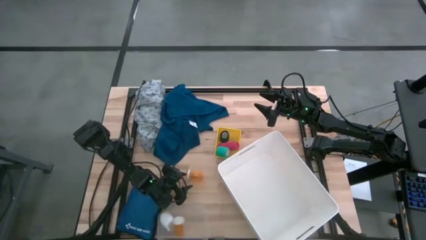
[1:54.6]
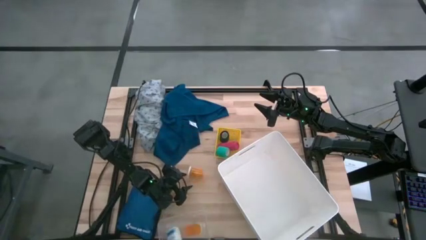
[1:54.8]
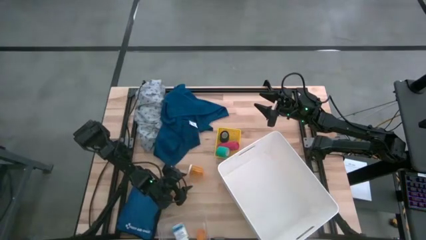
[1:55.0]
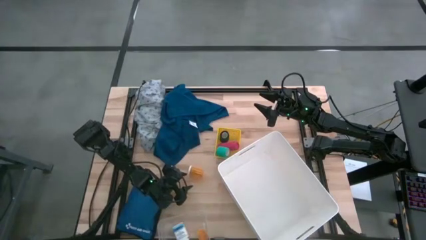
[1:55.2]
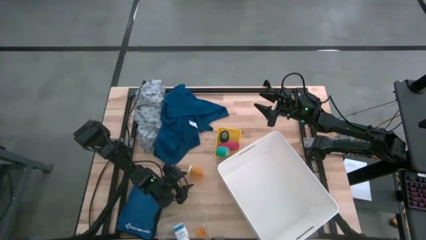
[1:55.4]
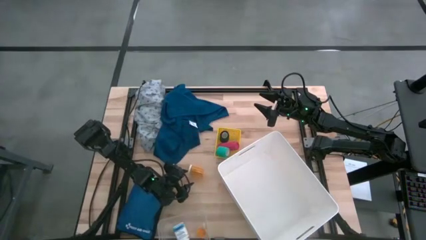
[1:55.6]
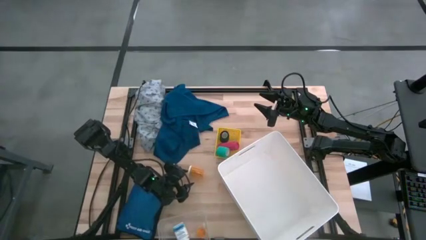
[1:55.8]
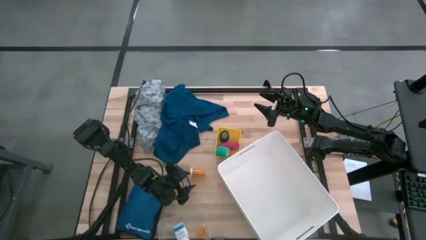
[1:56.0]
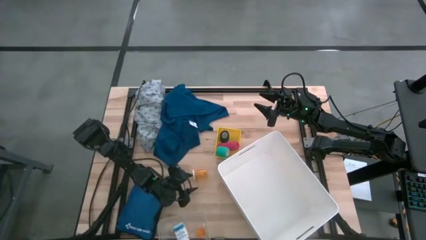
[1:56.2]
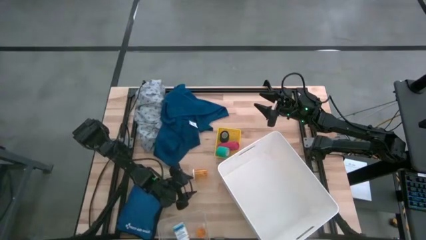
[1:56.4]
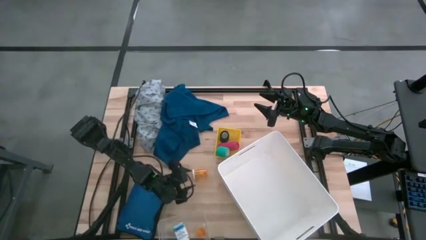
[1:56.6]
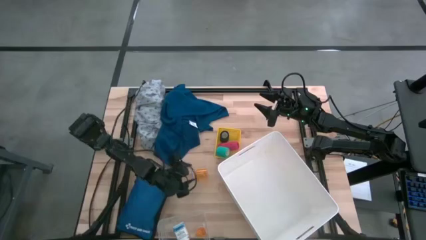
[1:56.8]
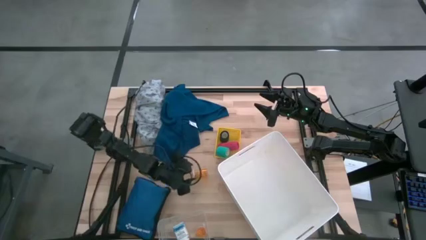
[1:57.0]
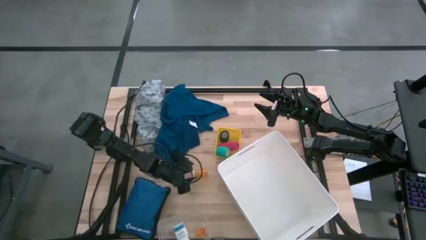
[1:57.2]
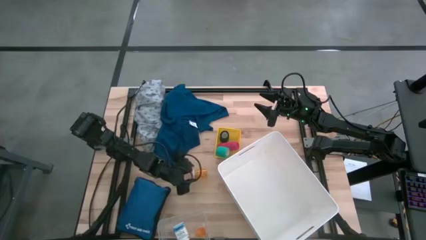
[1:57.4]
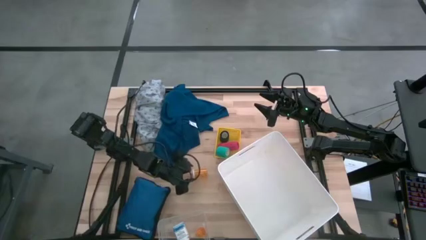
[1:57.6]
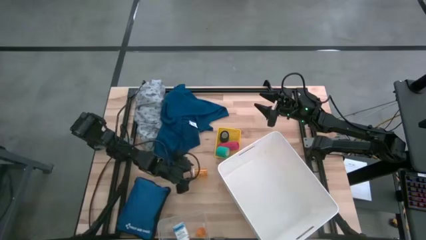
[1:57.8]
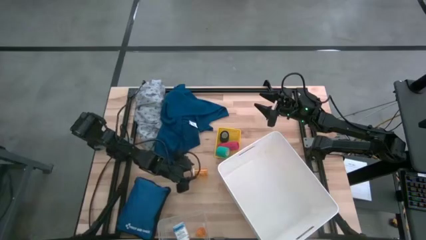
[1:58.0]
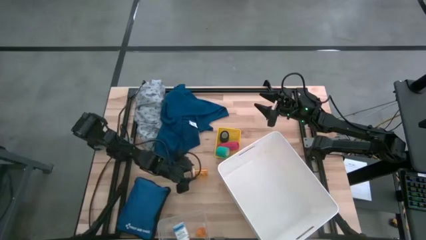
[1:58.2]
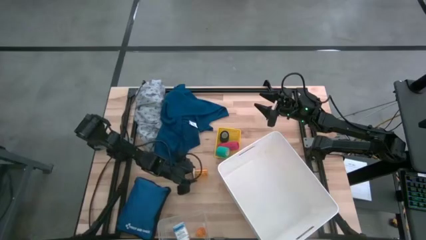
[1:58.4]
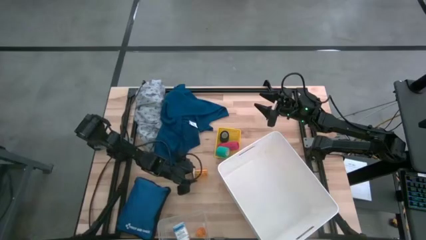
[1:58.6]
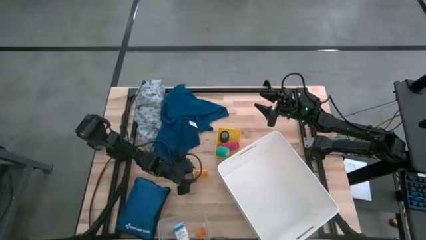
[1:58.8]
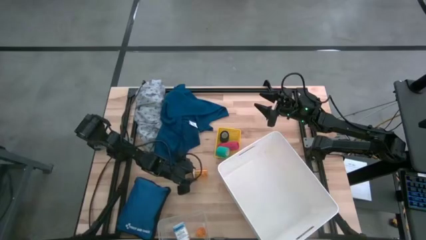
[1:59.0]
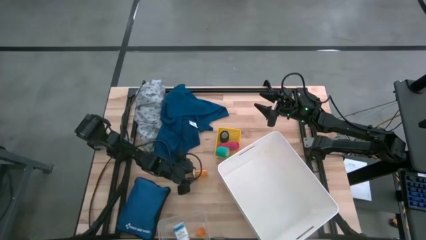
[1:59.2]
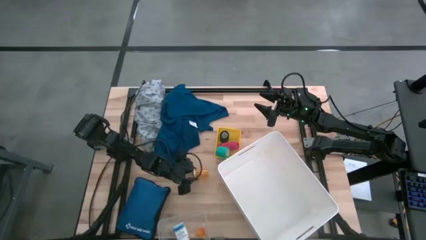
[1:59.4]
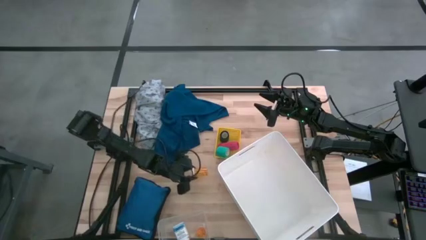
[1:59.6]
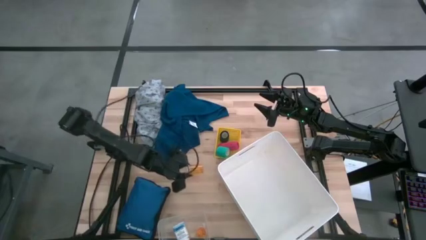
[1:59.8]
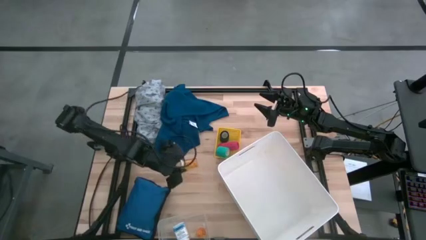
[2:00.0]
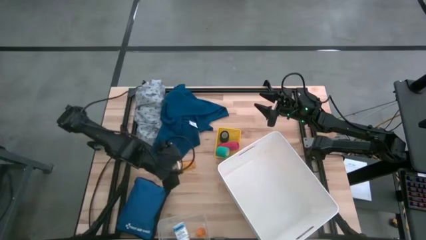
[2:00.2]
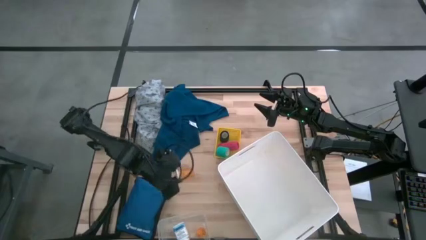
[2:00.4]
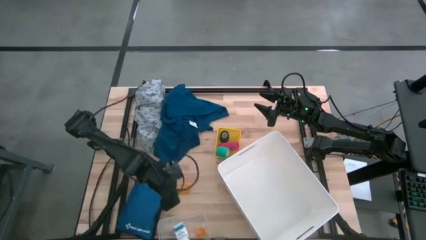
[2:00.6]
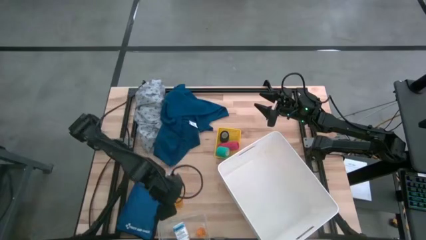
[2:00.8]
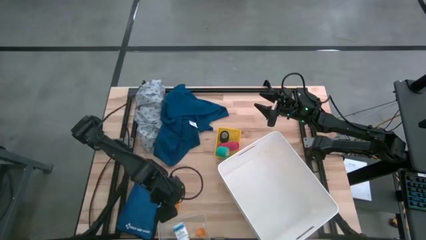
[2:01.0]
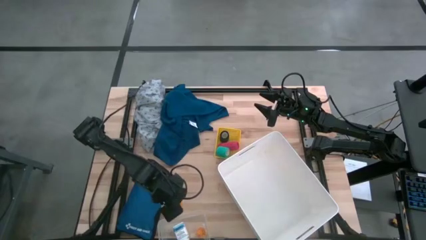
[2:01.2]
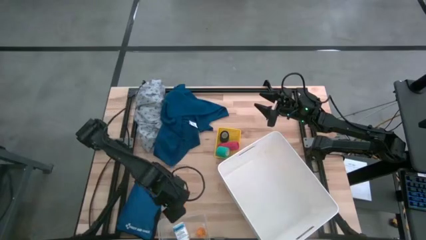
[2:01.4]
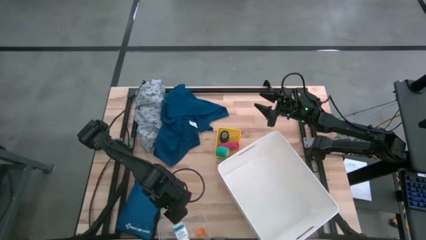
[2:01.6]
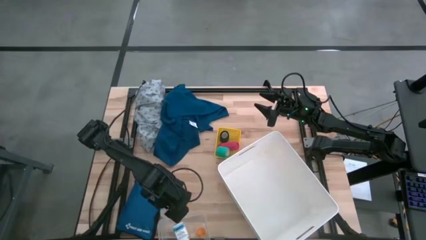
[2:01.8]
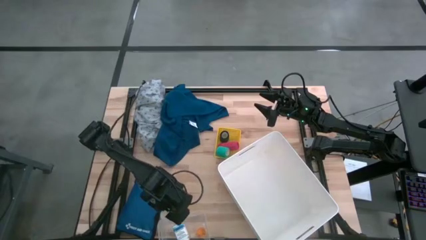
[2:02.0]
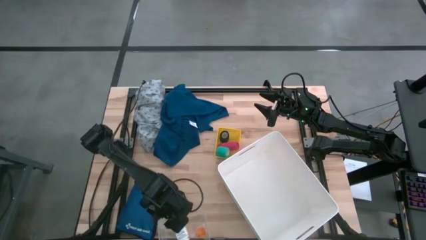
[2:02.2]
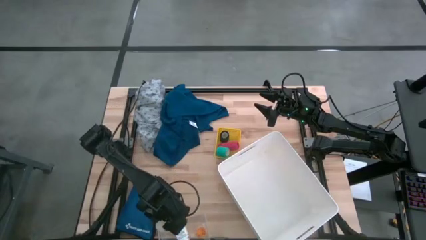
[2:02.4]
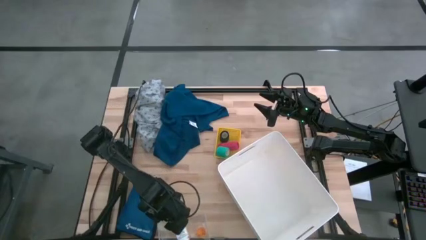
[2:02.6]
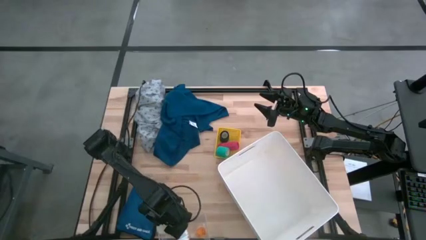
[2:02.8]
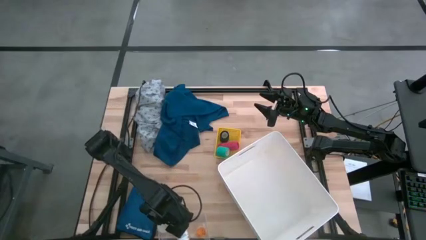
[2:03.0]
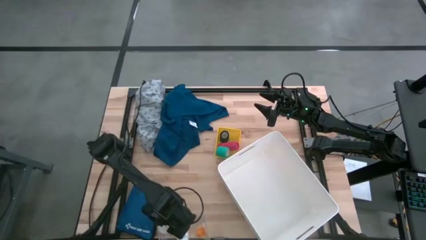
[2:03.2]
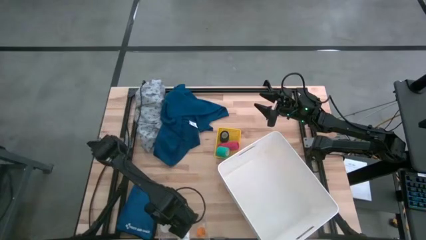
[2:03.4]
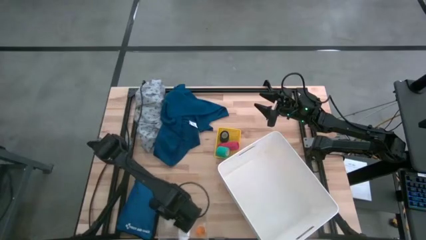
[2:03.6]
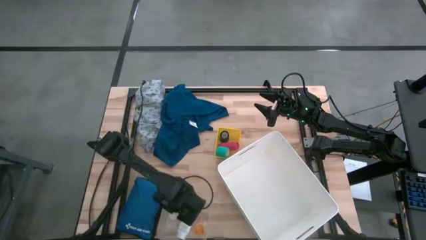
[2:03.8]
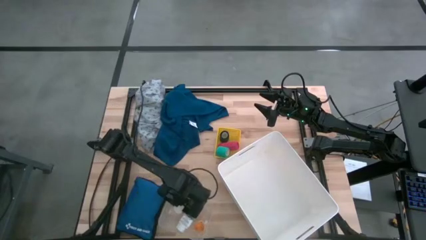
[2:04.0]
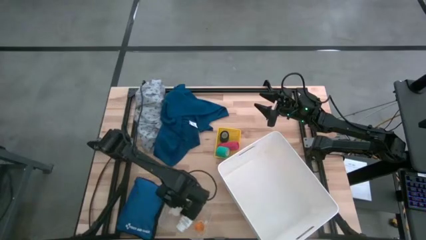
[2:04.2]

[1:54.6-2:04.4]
Task: Pick & place medical supplies in basket/bin
Put the orange pill bottle into the transparent bin

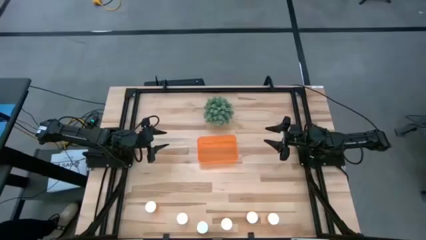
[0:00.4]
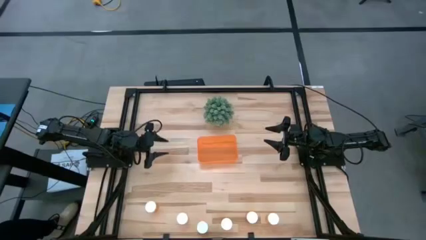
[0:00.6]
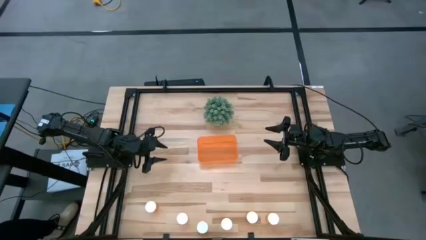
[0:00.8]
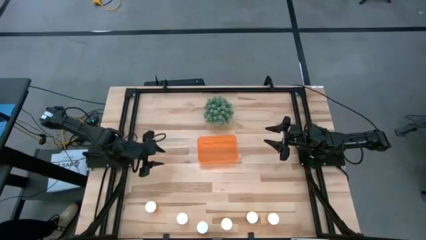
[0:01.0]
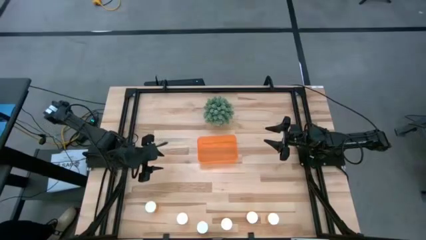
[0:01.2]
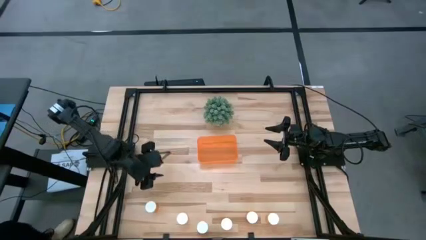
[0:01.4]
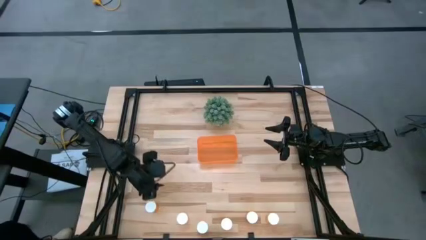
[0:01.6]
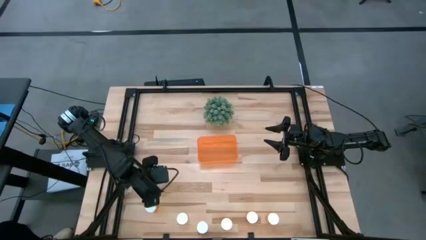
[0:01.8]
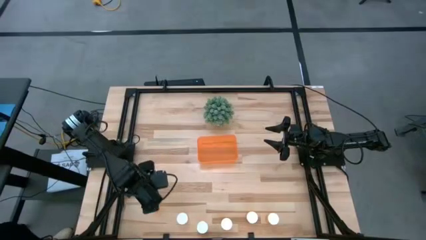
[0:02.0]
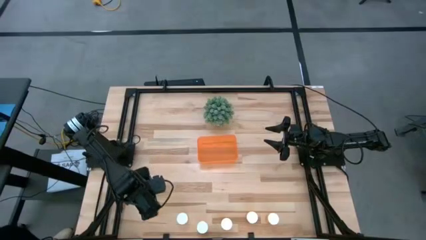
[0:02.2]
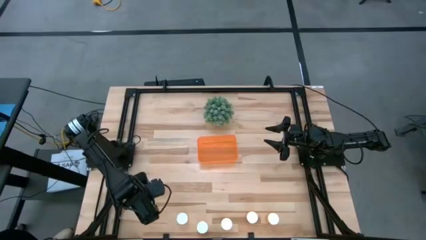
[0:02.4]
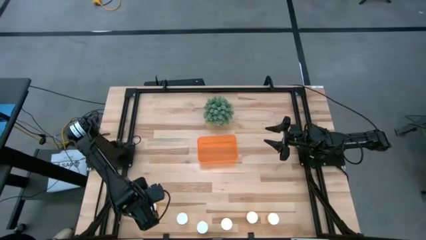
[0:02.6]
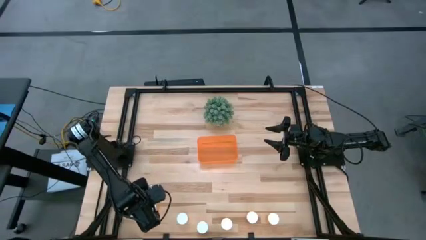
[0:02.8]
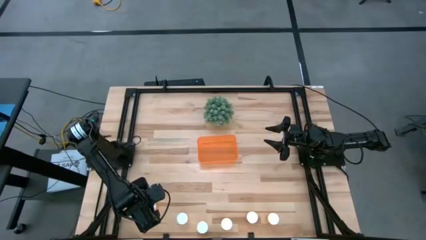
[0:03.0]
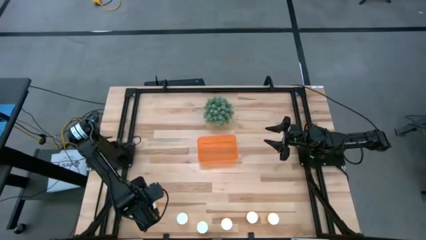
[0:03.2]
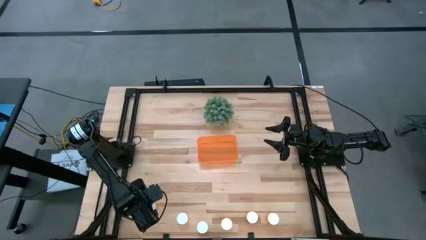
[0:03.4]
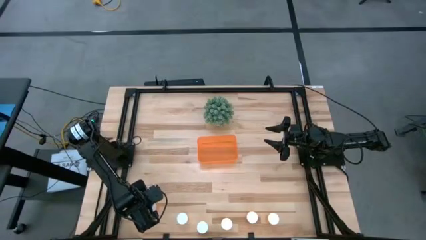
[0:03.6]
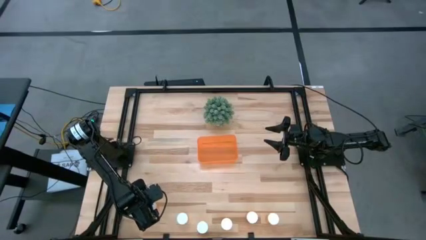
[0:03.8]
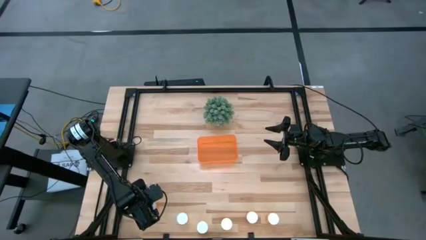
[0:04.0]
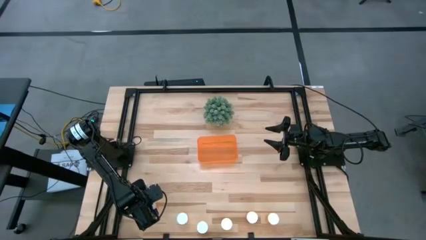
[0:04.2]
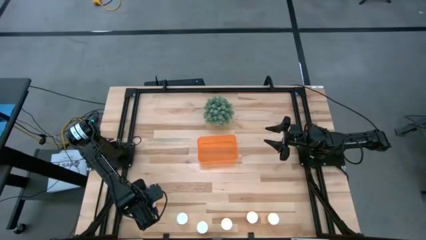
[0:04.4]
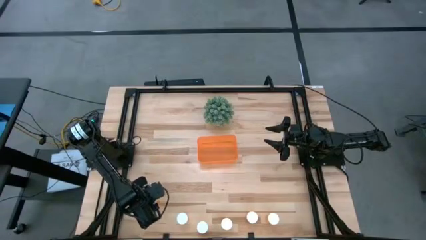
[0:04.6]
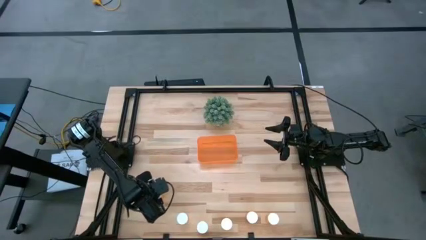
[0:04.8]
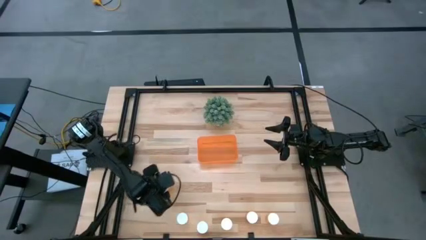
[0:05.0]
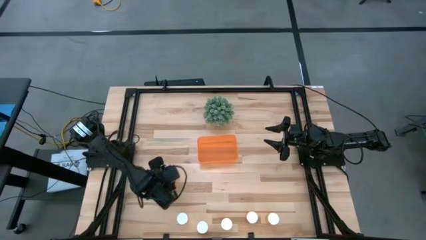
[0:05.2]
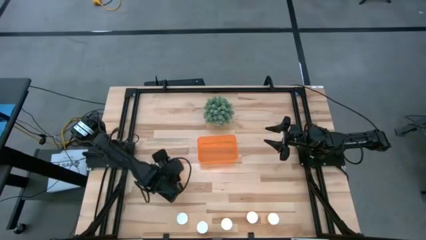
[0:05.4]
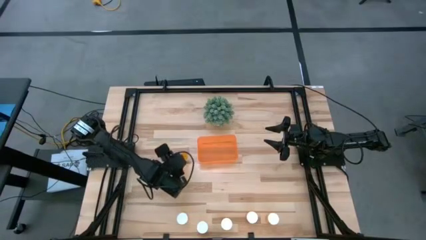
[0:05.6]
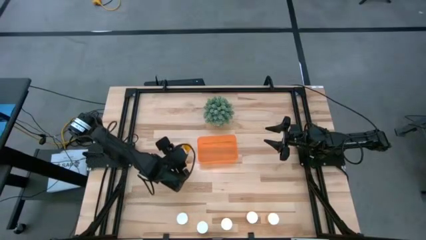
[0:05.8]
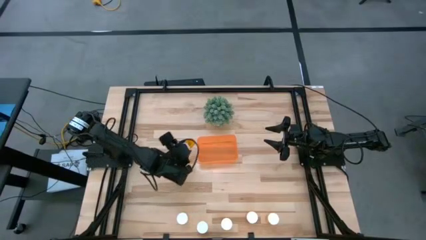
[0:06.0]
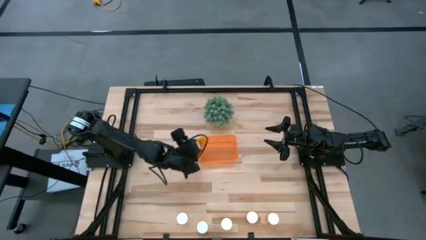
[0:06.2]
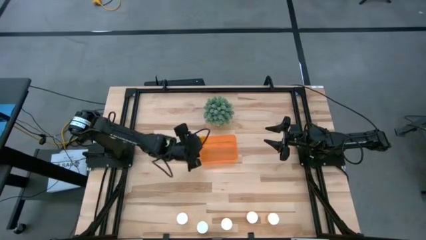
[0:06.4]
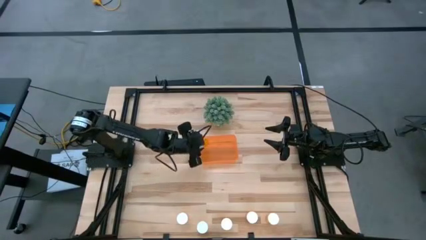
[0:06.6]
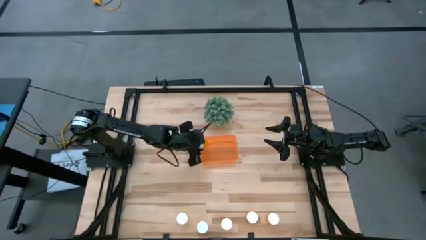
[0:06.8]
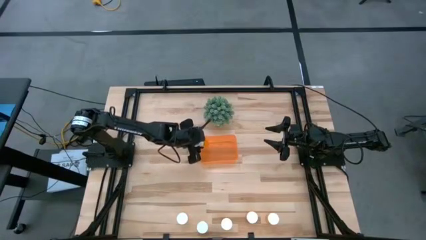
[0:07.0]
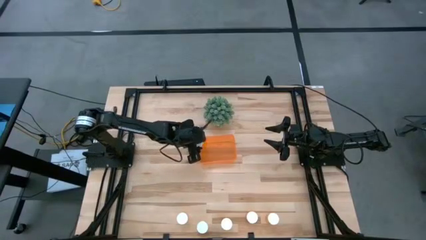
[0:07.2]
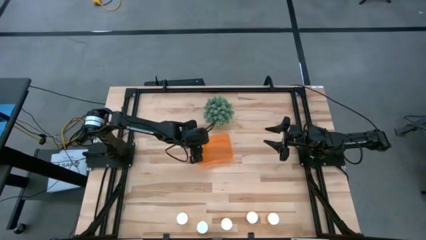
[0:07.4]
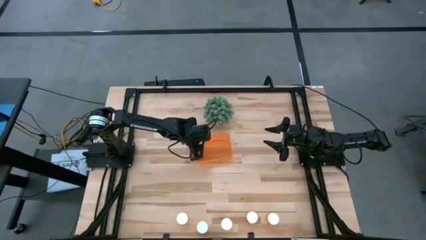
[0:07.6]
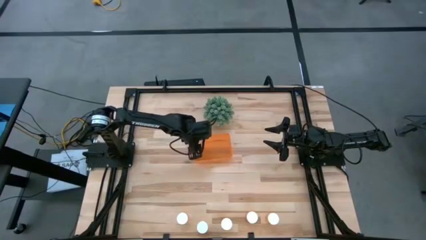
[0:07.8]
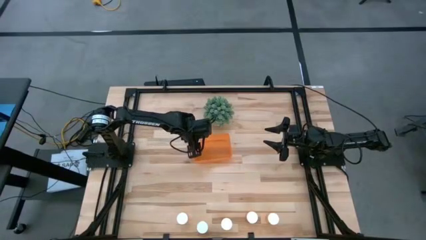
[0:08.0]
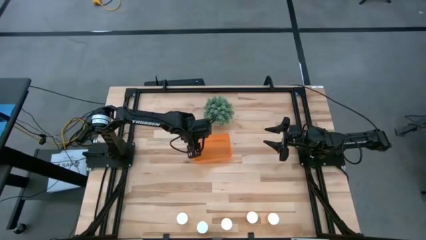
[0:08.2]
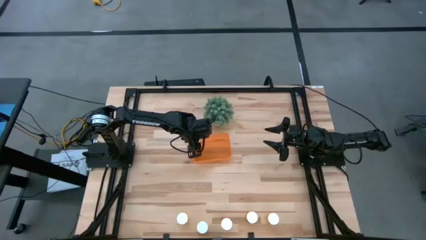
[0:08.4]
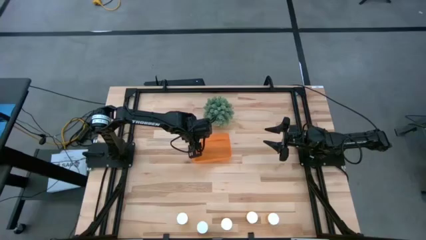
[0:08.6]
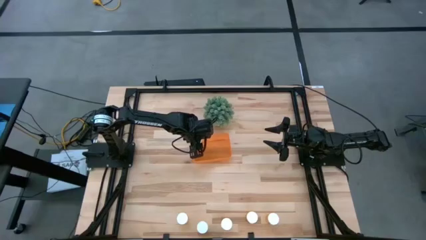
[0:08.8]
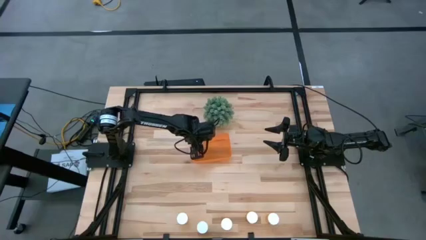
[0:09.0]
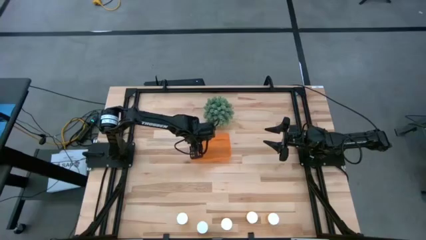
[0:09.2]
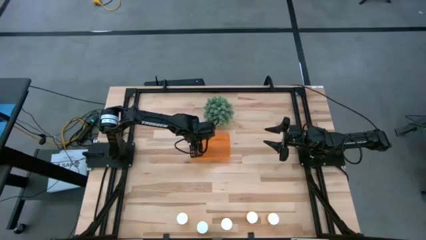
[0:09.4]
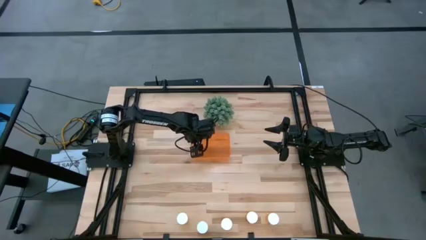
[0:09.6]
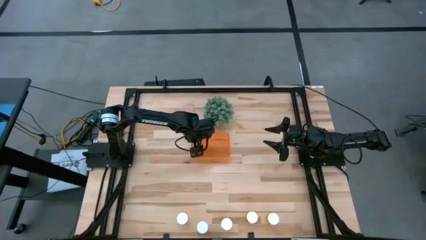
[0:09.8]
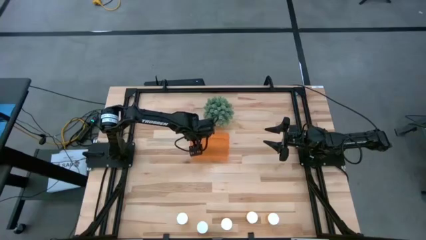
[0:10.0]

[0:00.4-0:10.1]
Task: Pick and place pill bottles into a basket
Put the orange pill bottle into the orange bin
